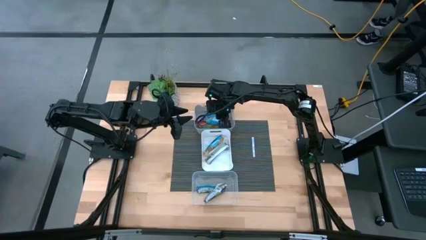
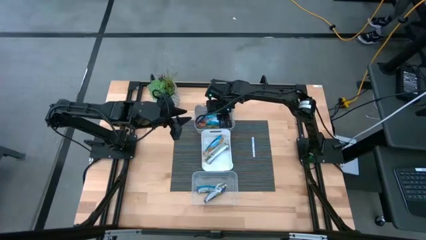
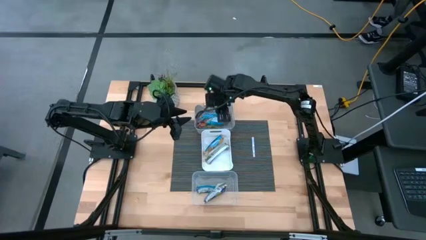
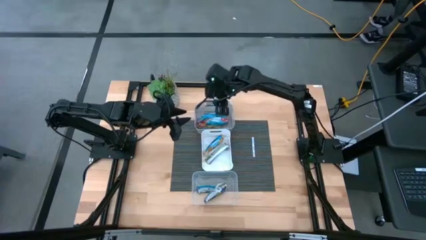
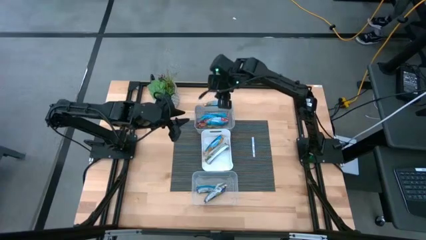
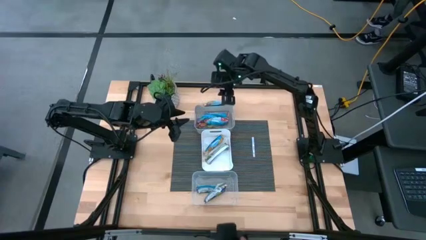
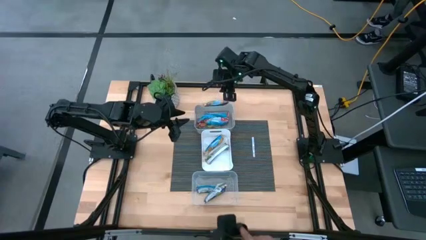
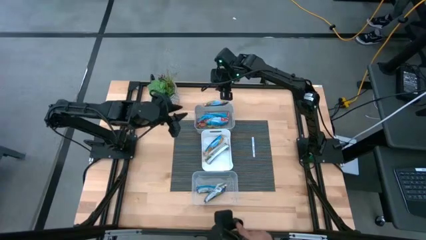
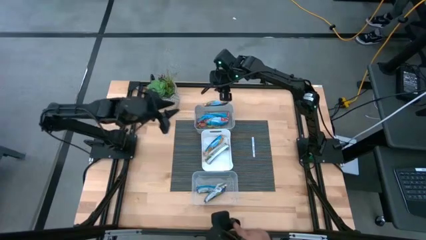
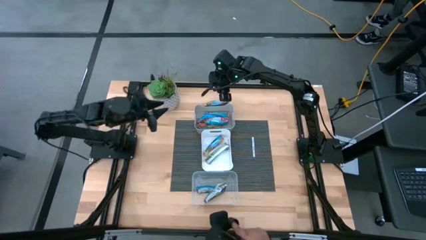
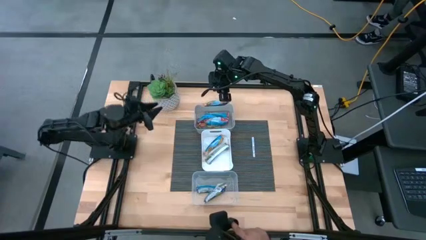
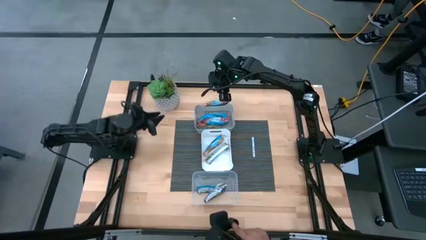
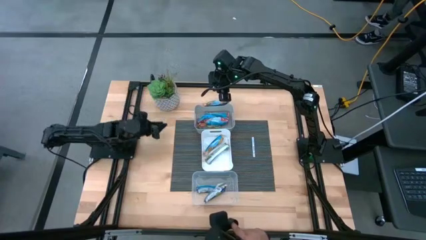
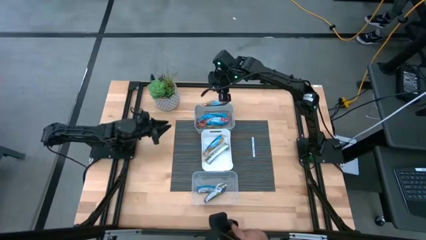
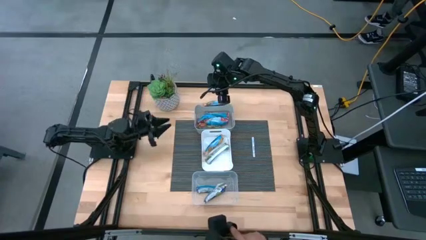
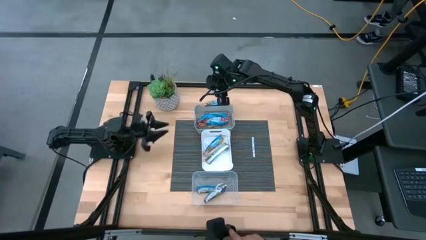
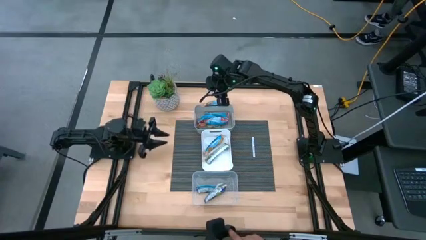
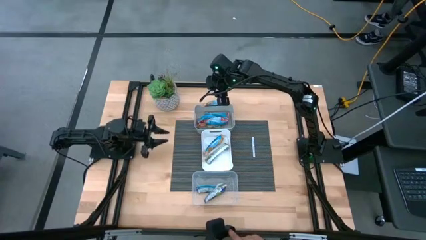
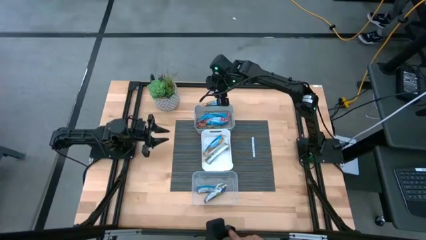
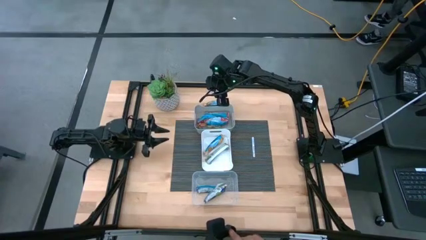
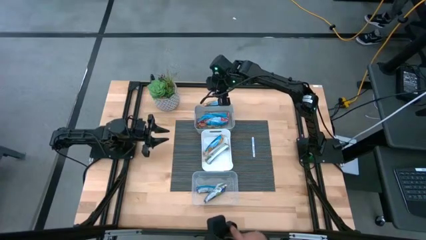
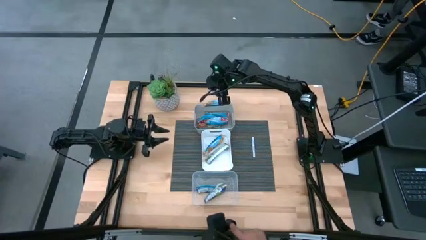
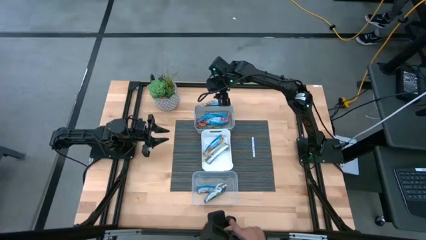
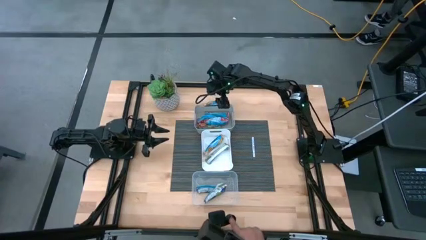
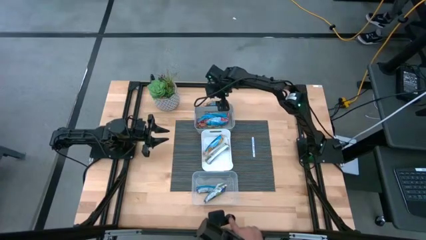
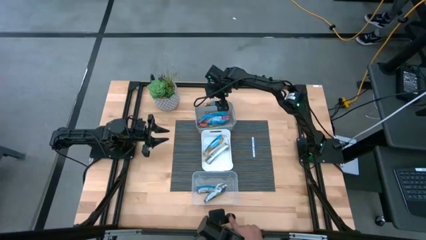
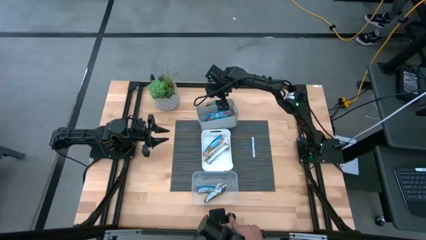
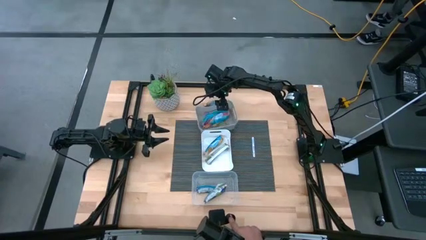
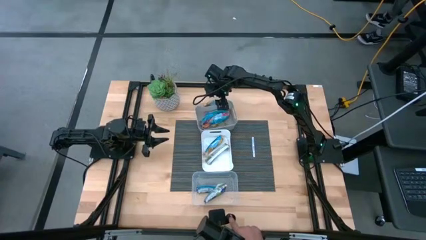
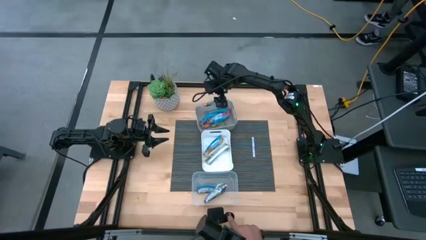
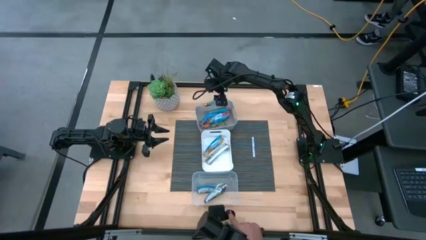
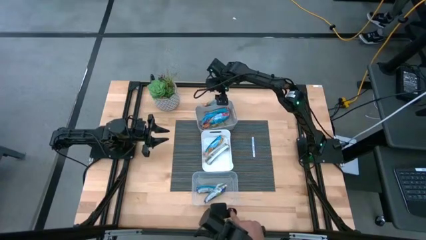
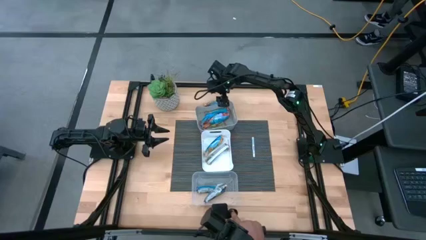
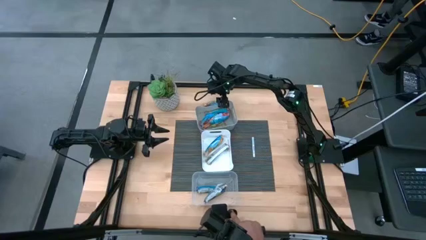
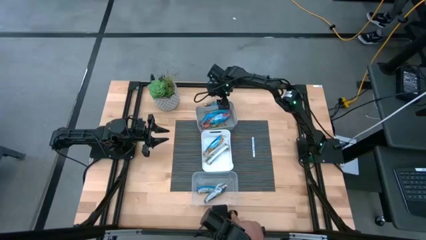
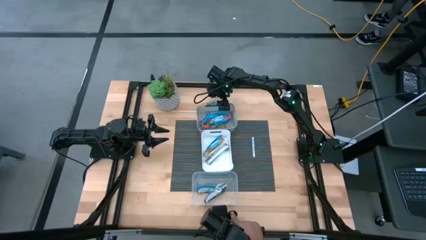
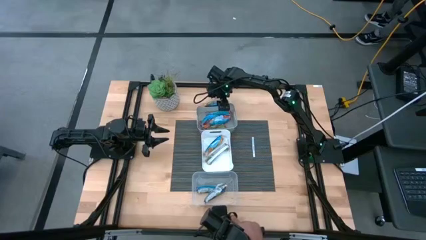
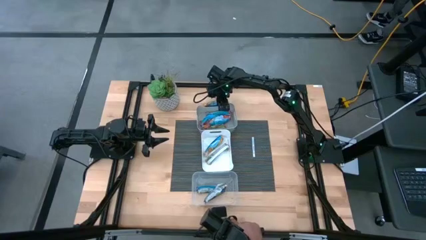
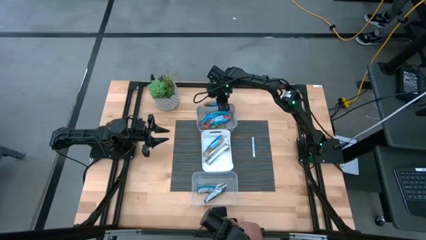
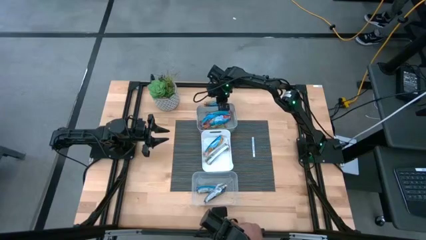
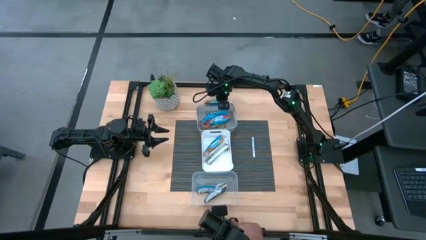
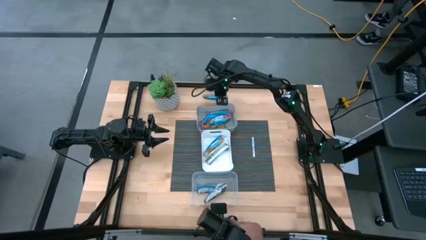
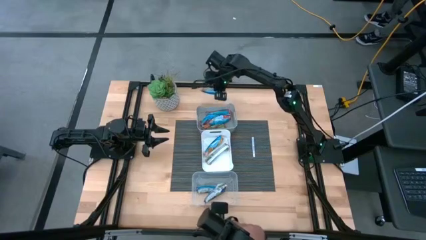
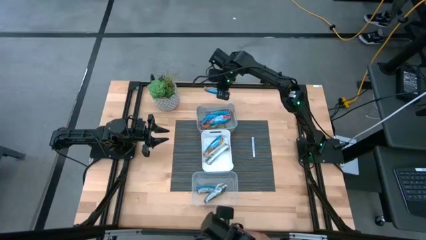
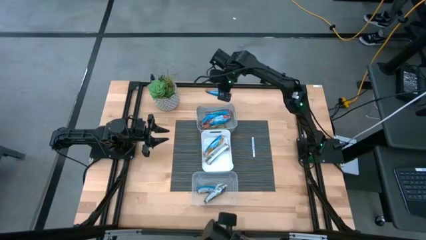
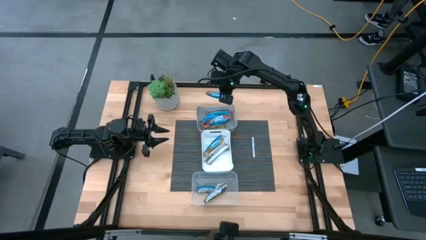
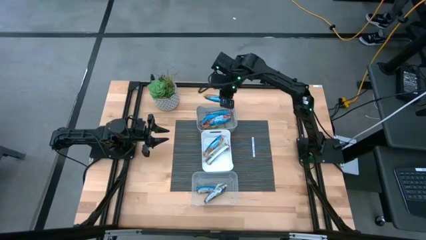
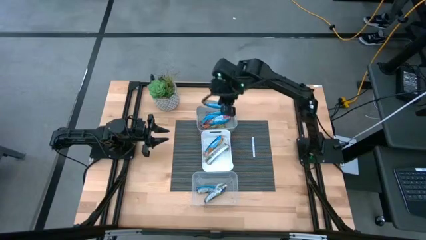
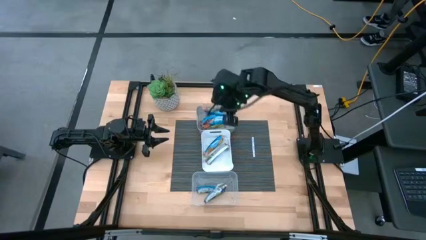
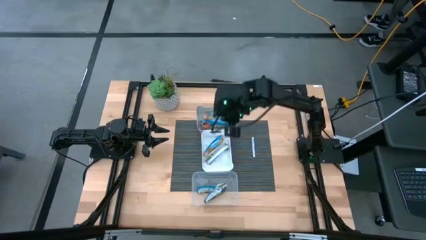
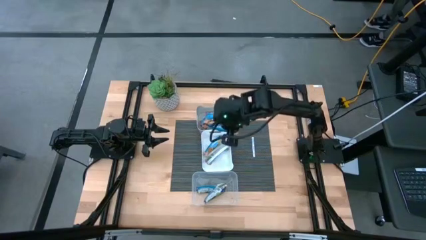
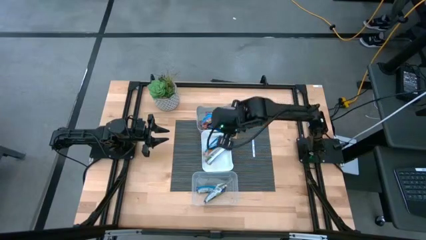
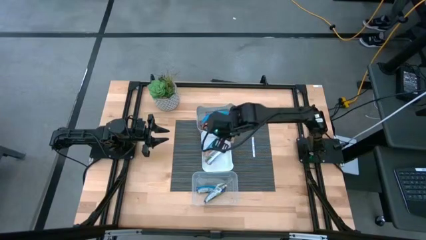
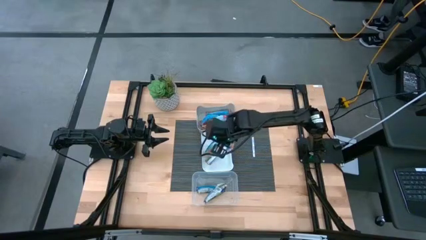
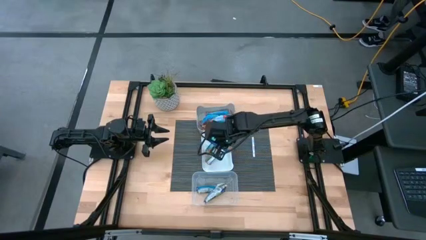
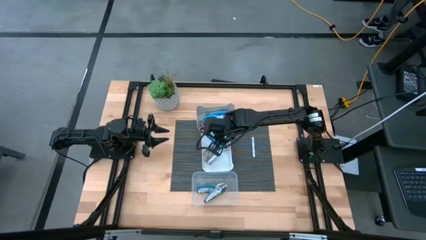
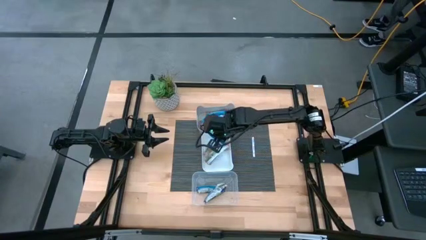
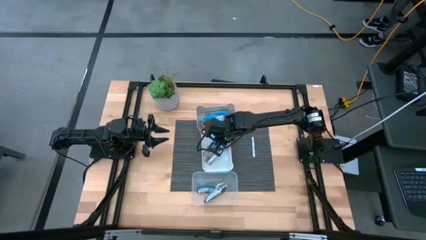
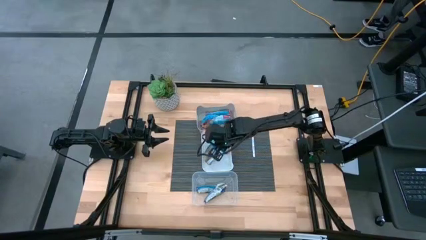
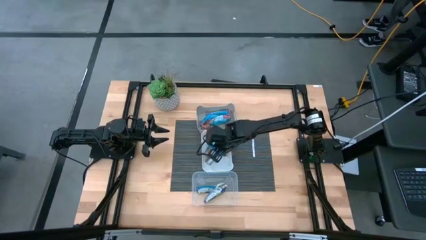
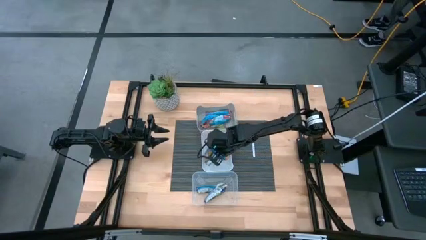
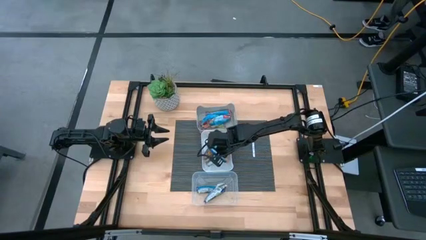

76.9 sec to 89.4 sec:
Task: Pick and place Granola Bars by type
Put the orange granola bar into the white bin

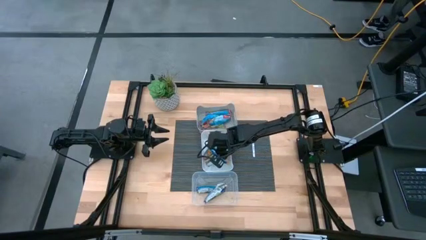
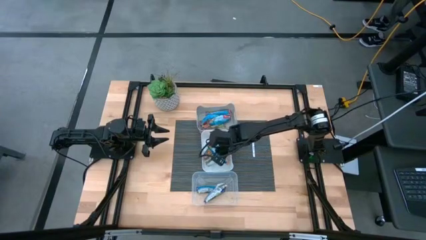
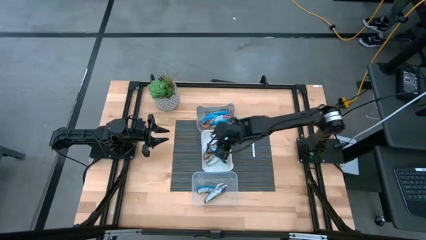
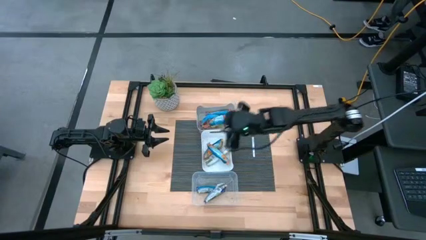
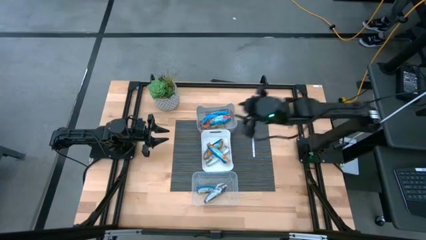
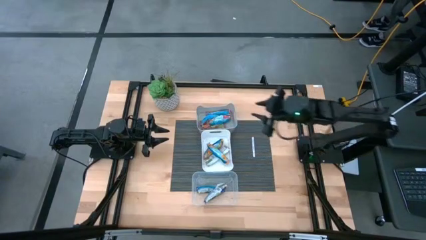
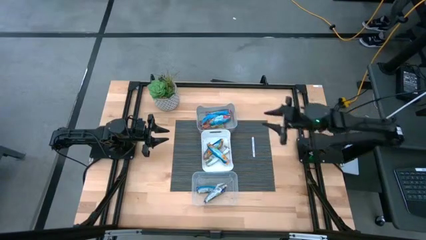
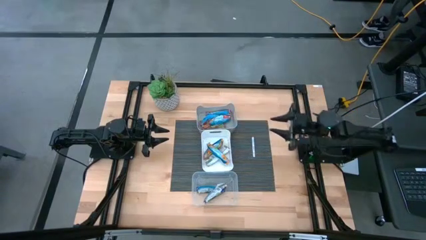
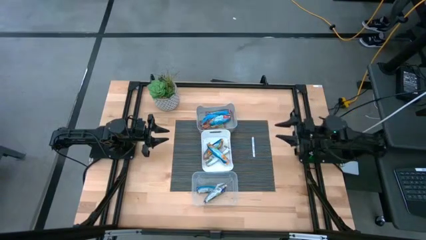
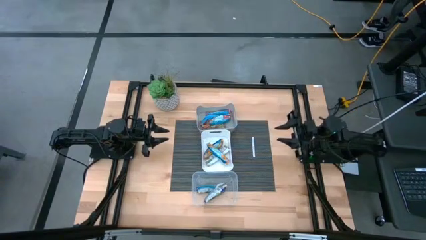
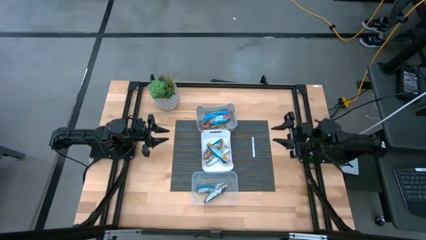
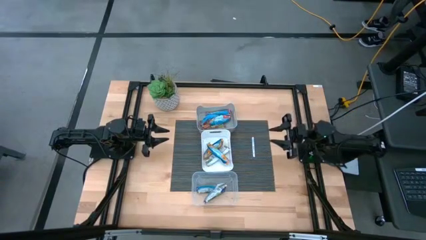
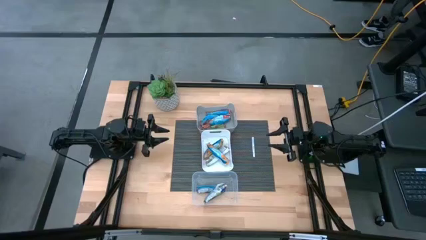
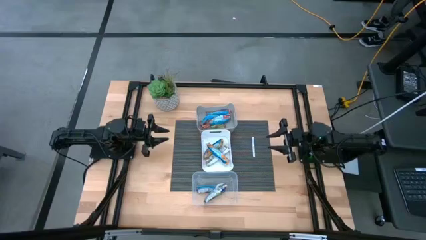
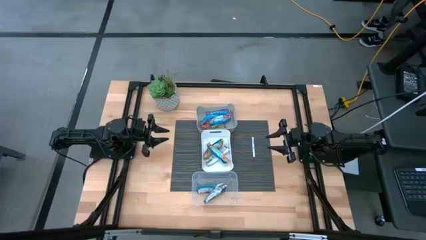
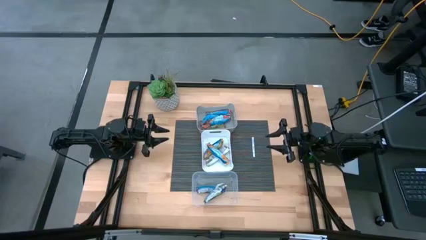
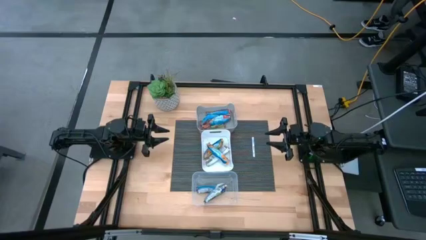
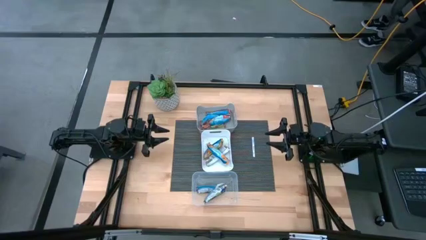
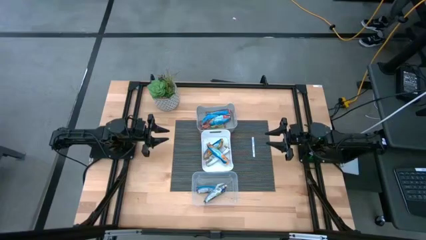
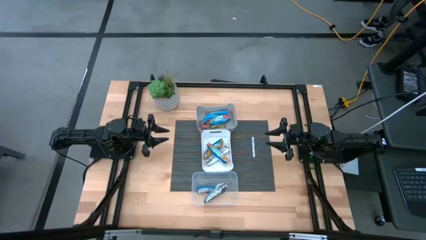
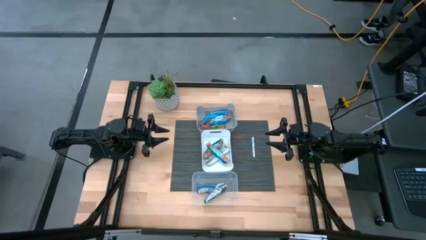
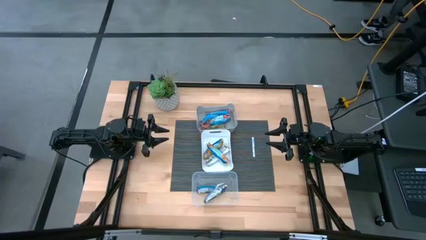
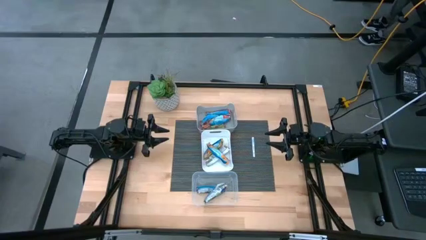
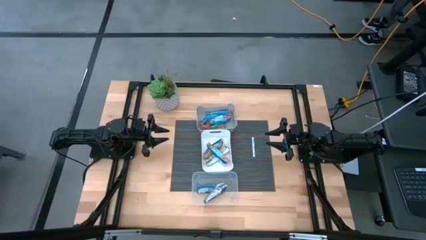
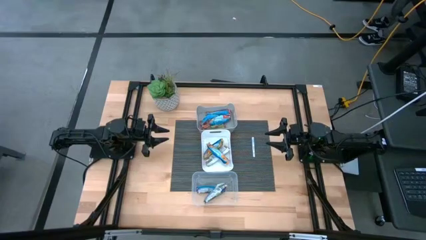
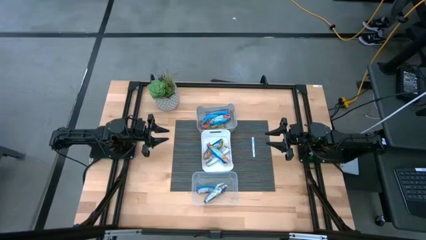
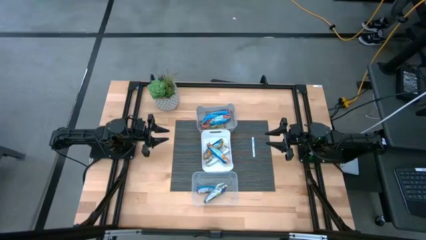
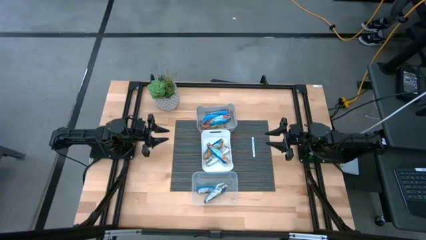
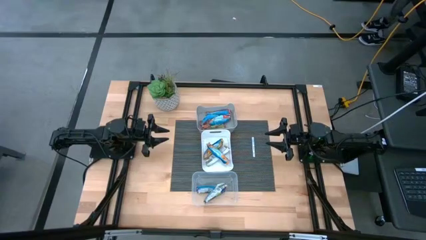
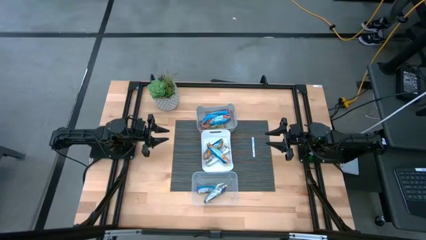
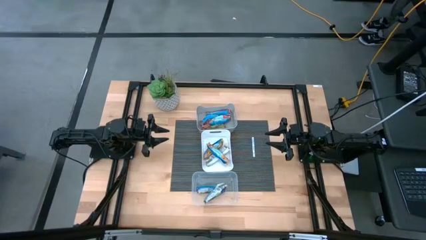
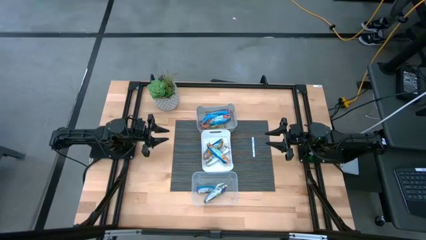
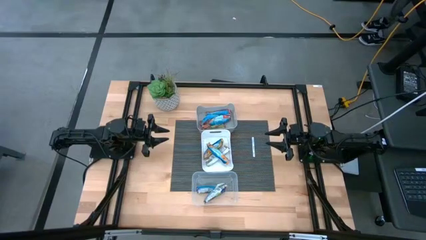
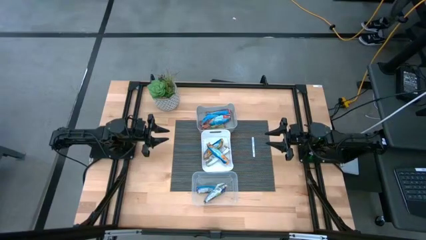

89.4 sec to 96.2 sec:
Return to Home Position
